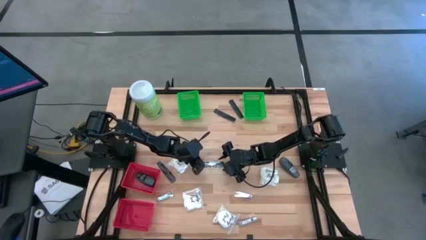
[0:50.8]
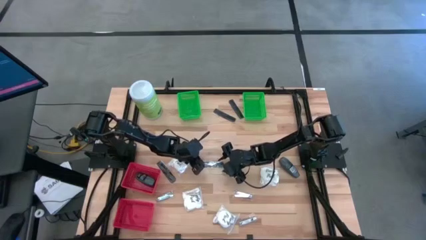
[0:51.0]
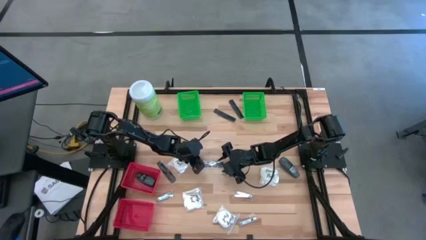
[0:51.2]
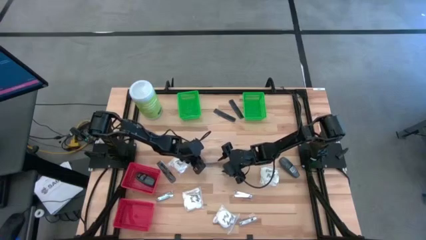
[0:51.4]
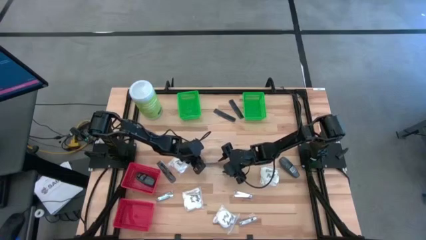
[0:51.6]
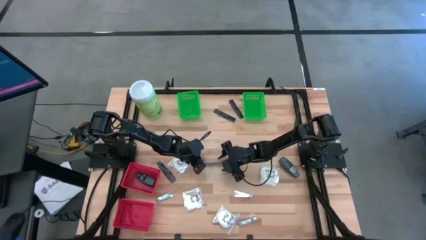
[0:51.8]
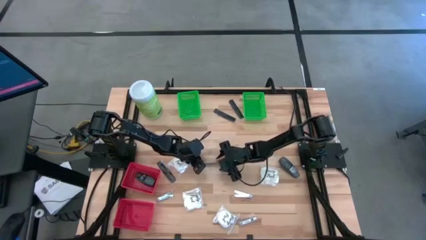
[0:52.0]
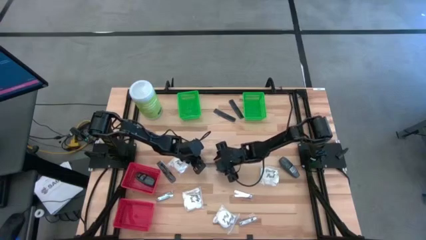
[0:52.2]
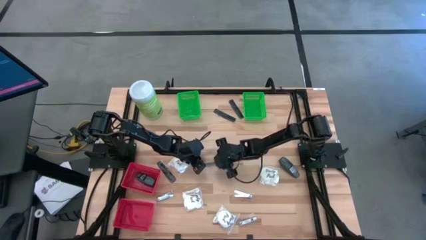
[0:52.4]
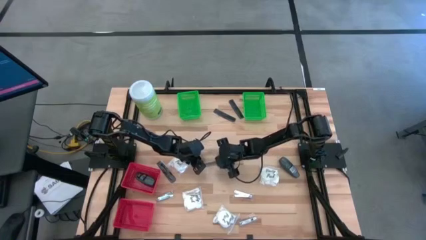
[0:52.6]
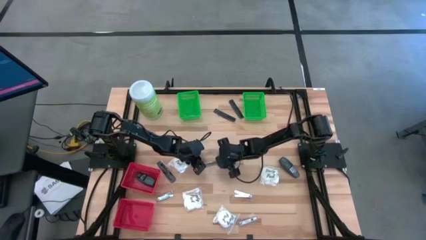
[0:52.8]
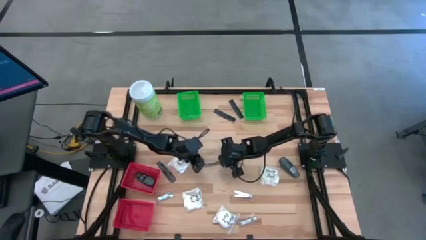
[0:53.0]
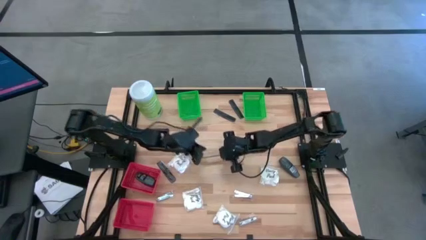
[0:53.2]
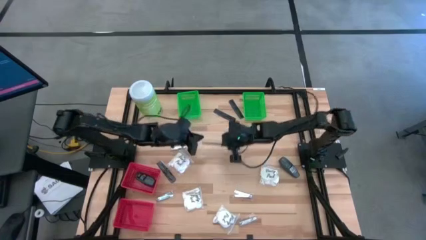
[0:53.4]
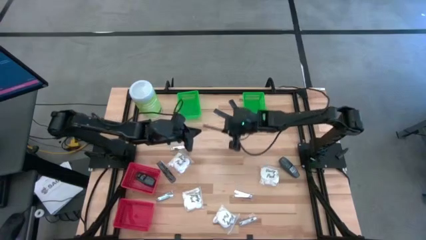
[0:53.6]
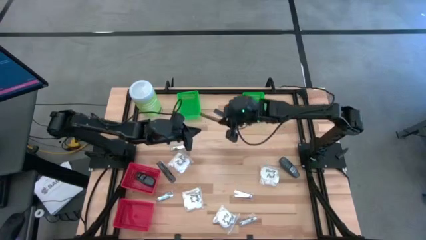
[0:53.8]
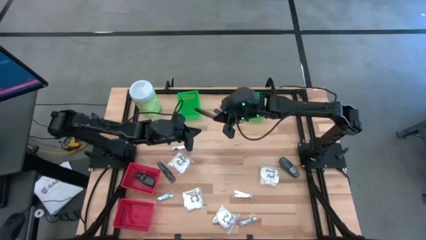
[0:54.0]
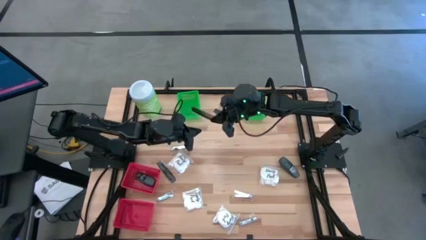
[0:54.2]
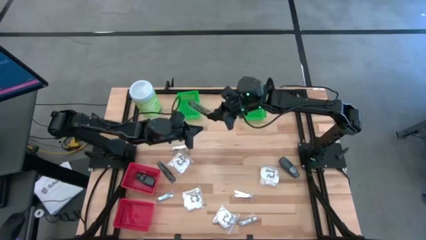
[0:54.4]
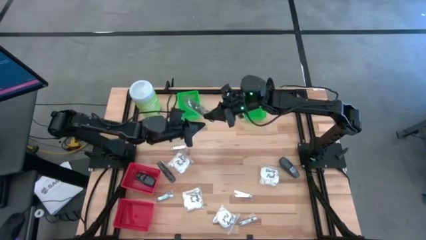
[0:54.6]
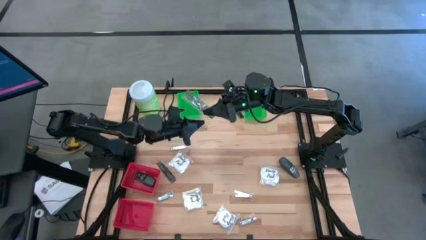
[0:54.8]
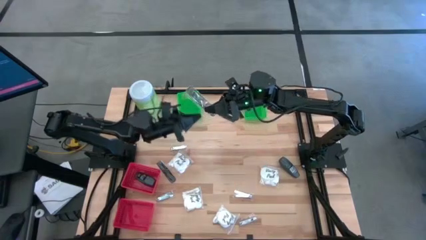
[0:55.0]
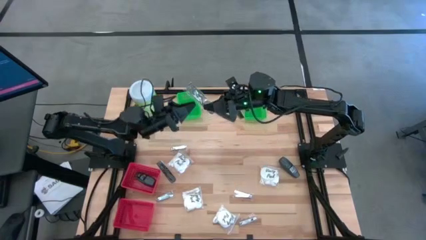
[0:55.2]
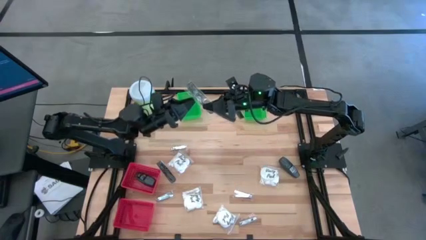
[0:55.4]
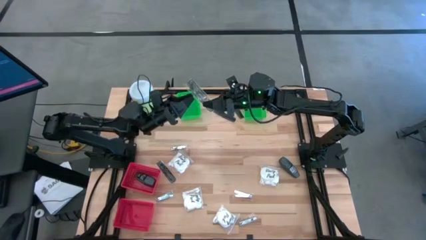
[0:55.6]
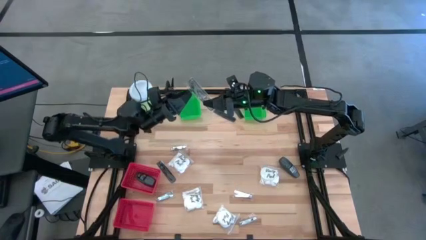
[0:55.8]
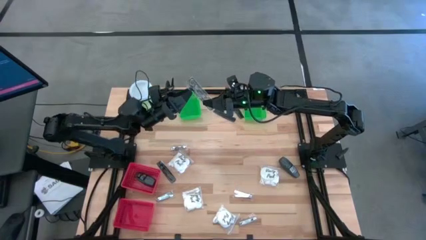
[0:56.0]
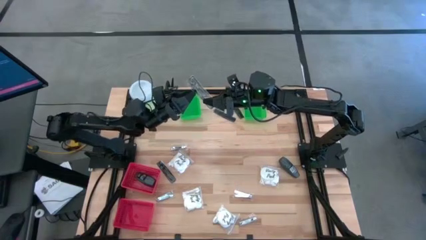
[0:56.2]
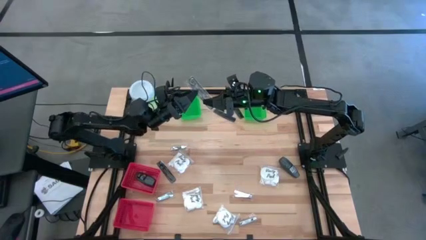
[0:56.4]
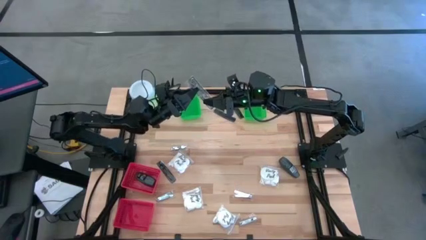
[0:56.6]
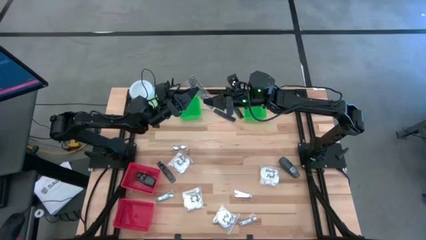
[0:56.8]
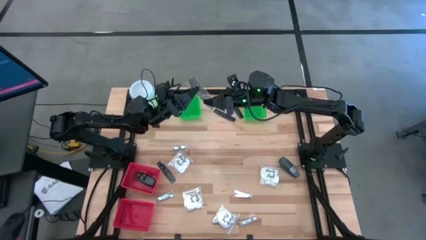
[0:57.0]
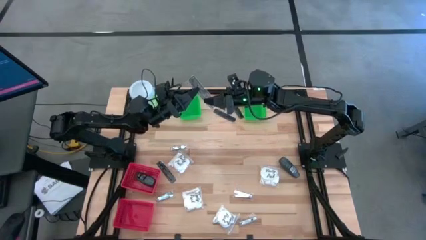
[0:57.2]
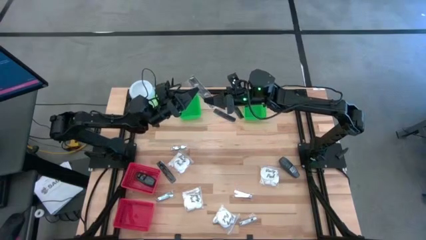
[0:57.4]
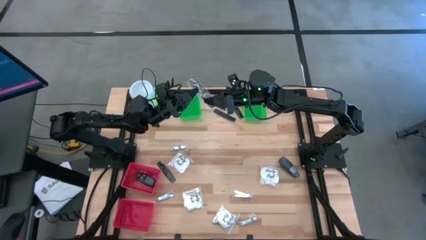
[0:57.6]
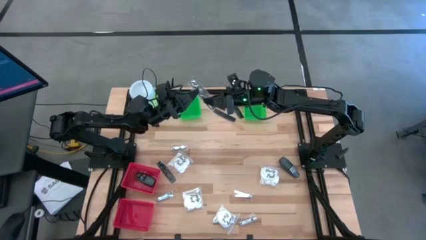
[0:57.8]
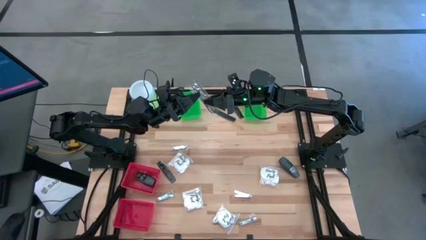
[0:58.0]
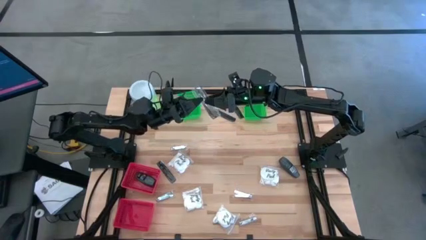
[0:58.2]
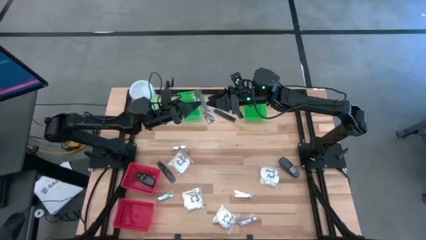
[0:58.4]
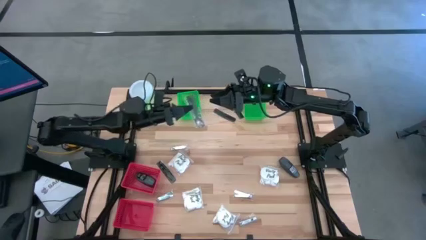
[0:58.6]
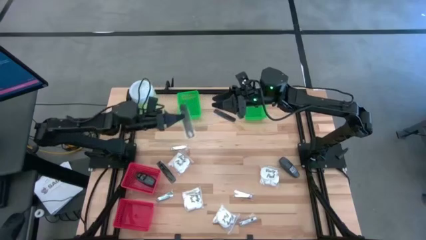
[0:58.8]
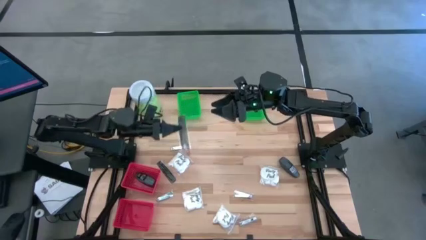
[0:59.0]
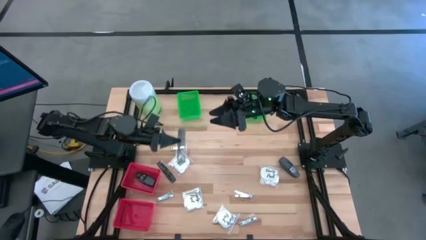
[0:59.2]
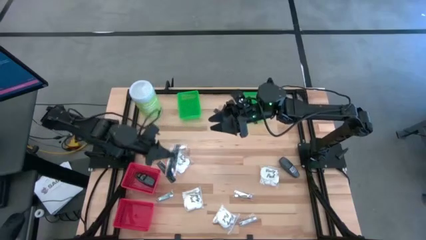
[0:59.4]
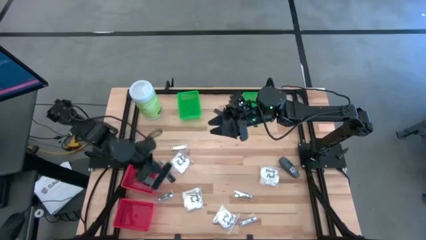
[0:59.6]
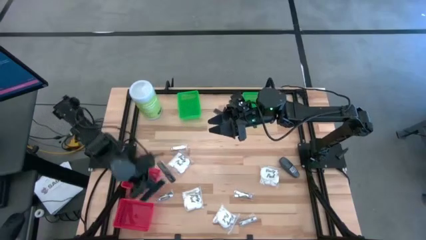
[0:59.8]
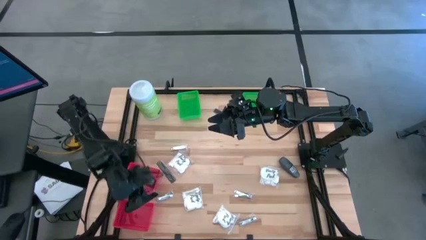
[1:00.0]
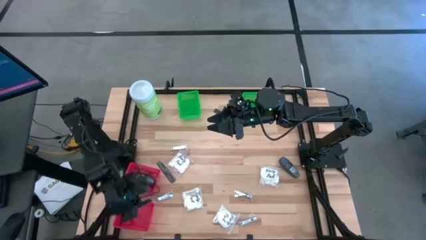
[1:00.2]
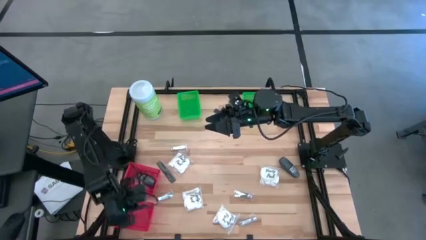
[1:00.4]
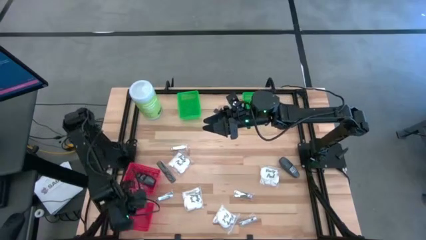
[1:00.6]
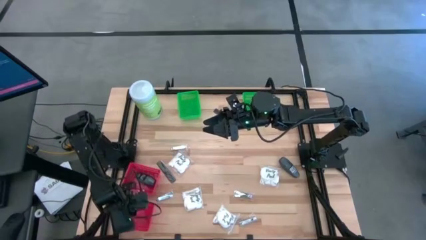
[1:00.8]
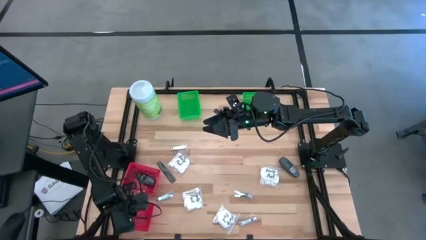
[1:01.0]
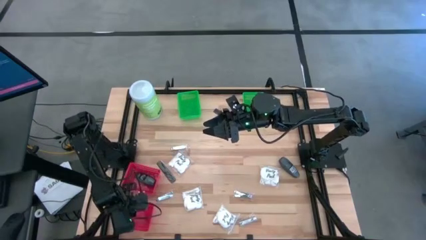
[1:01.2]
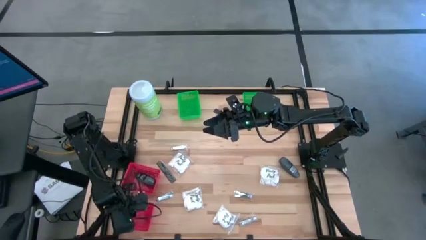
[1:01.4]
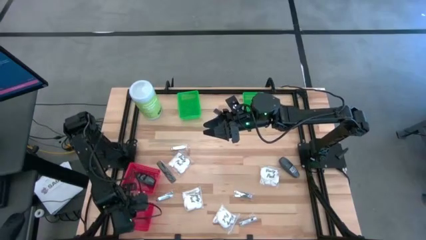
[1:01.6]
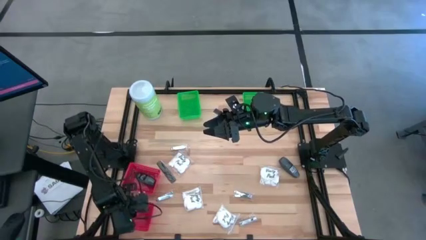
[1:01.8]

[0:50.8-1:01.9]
Task: Pick & Place Travel size toiletries
Put the black comb into the bottom red basket

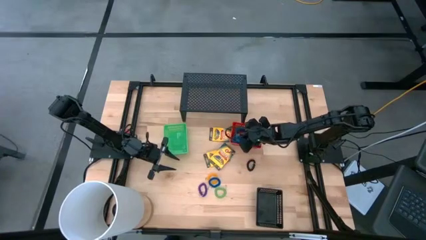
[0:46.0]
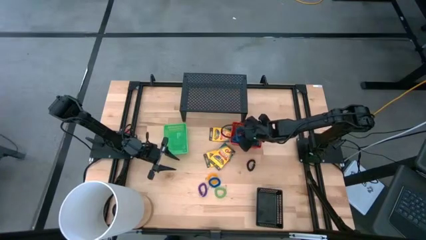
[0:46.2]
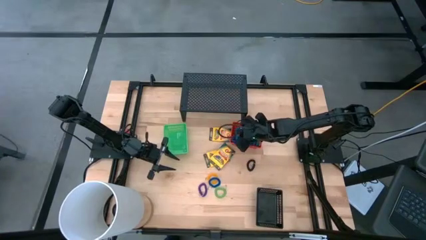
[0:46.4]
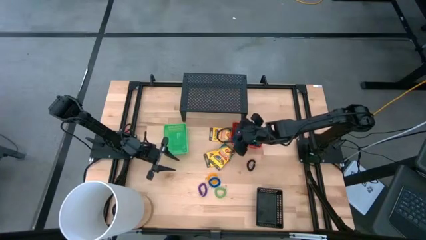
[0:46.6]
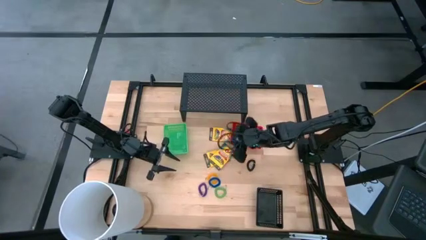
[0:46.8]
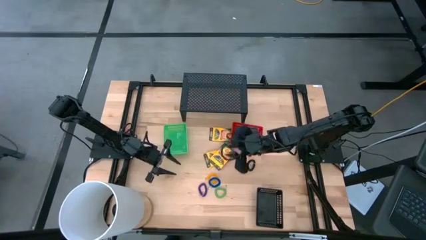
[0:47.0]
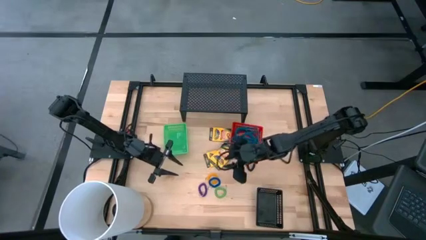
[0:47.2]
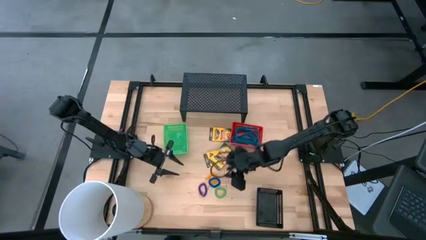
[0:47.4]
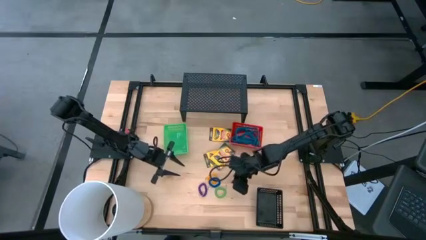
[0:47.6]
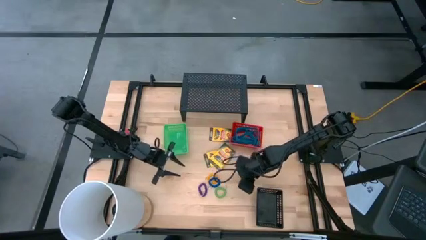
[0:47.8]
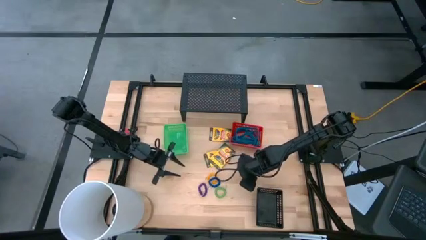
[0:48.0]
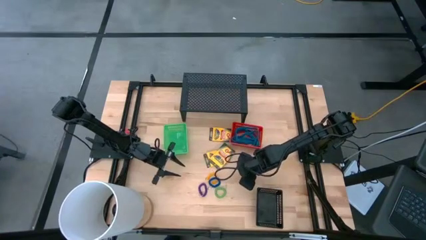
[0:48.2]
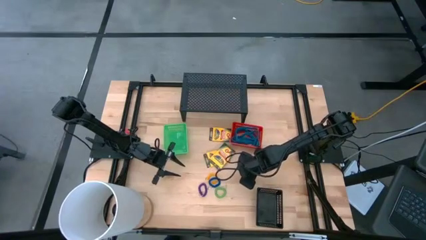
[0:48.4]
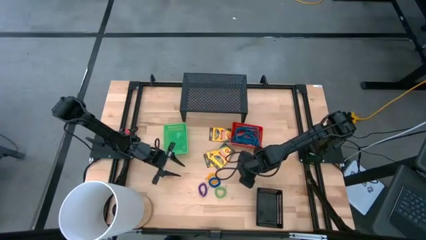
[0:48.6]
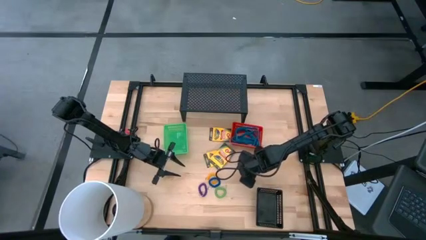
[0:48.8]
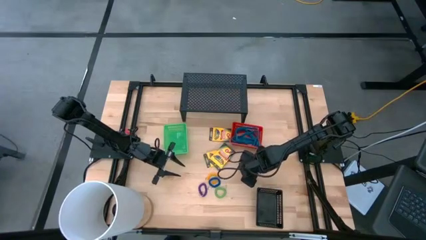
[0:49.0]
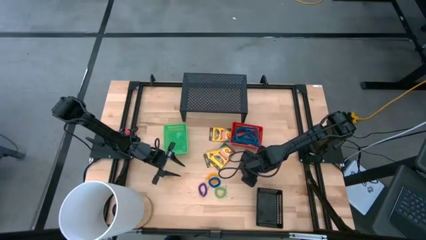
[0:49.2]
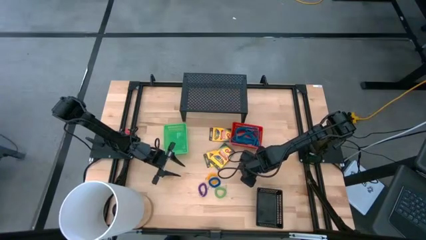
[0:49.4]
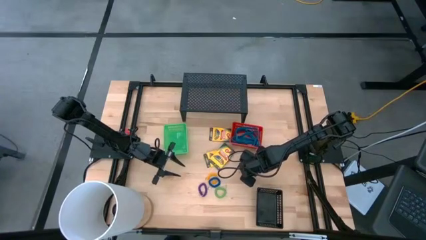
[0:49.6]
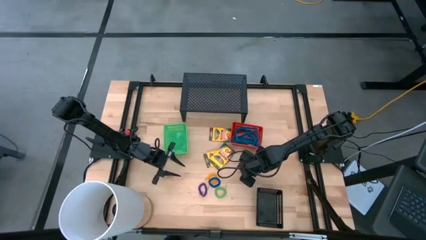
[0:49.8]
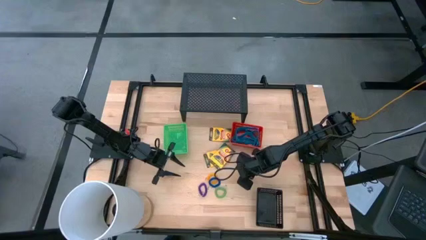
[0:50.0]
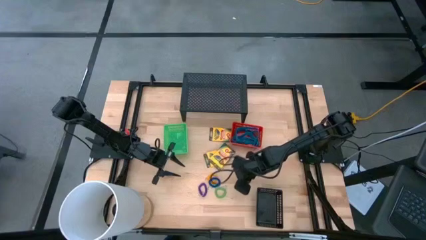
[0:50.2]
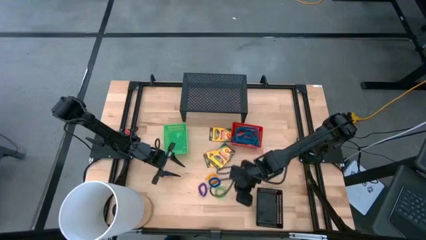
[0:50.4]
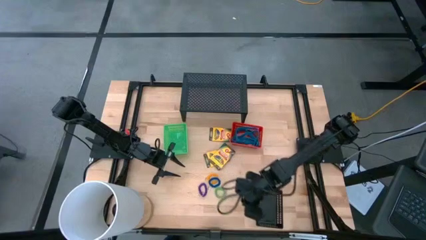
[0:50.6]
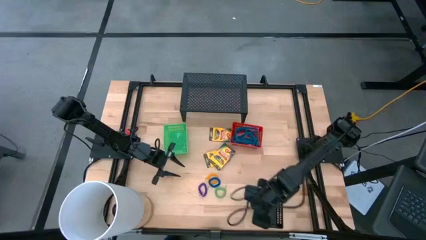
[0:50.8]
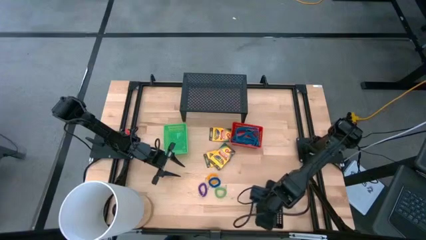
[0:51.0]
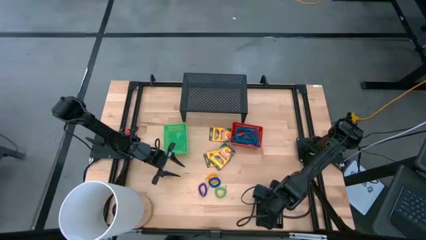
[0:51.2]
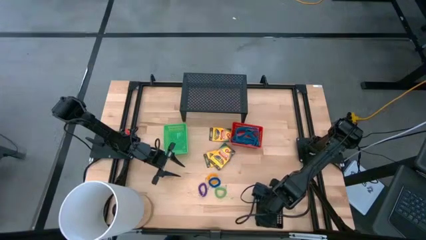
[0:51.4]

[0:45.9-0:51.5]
Task: Pick & Place Office Desk Supplies
Put the black spring keychain into the black bin
